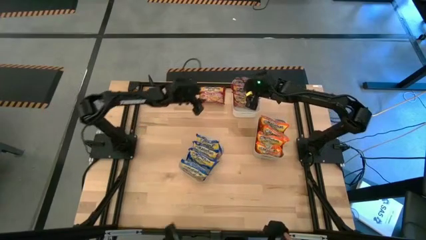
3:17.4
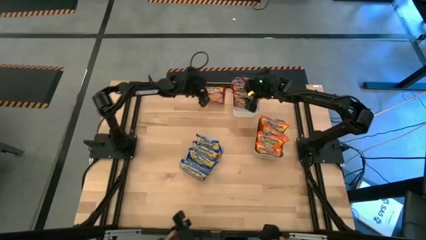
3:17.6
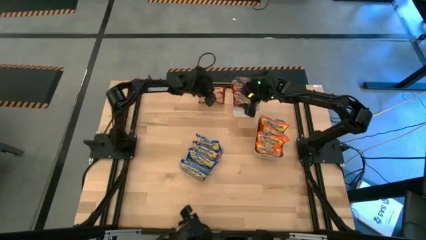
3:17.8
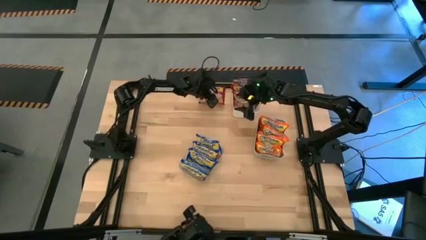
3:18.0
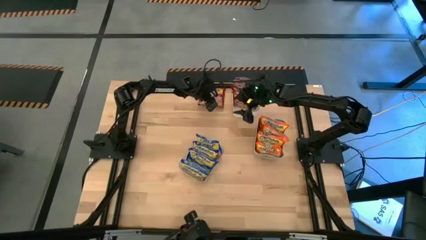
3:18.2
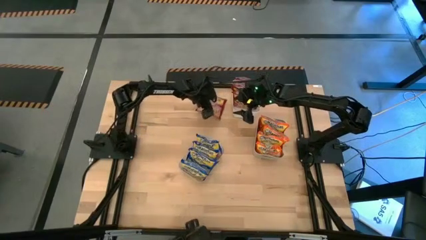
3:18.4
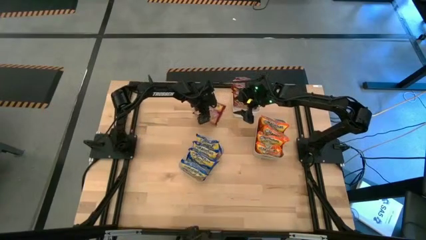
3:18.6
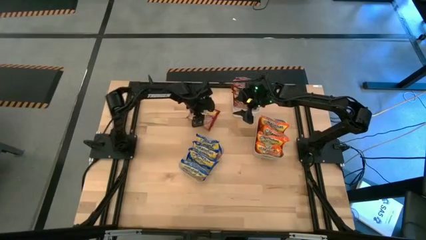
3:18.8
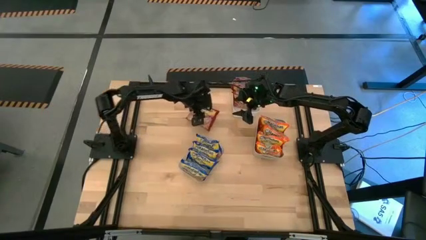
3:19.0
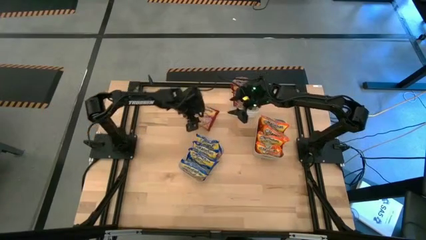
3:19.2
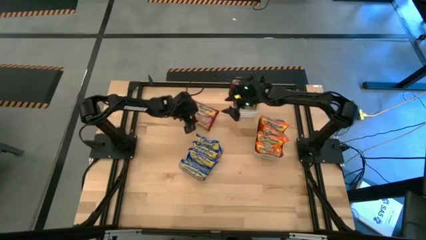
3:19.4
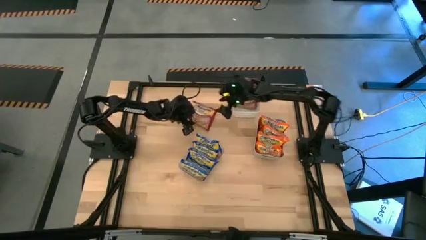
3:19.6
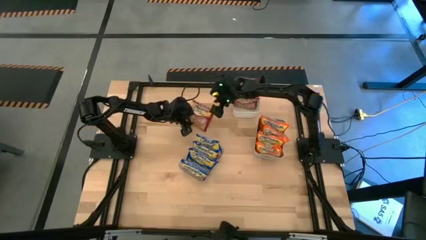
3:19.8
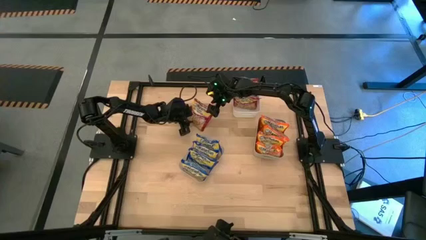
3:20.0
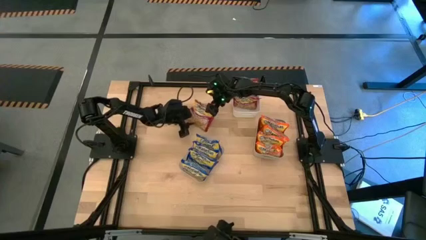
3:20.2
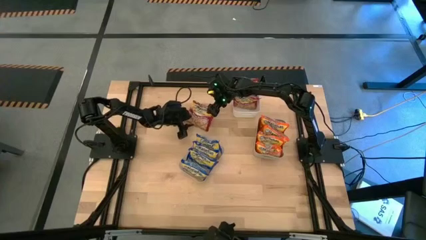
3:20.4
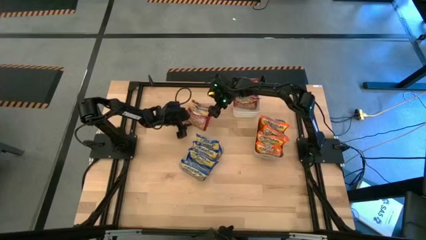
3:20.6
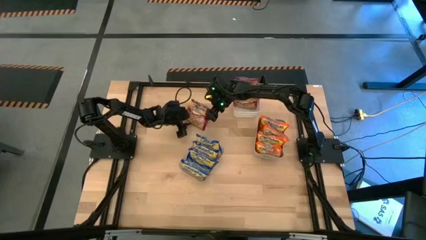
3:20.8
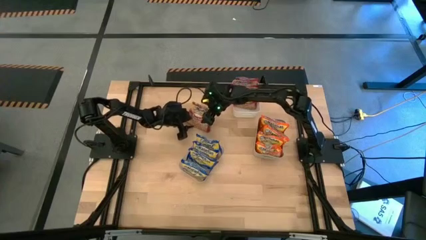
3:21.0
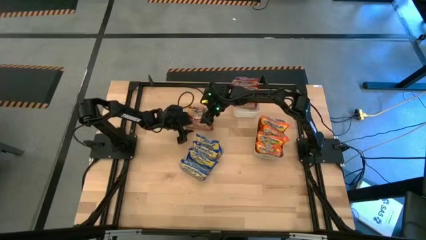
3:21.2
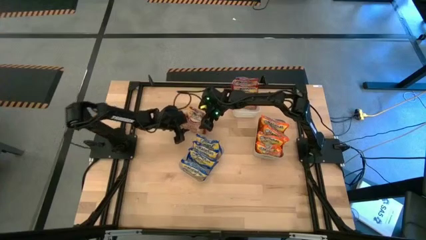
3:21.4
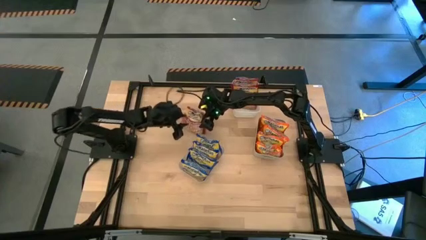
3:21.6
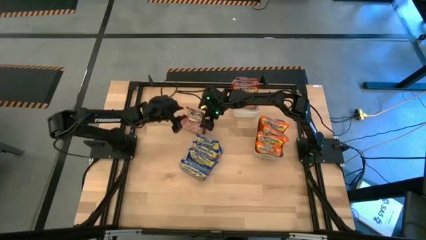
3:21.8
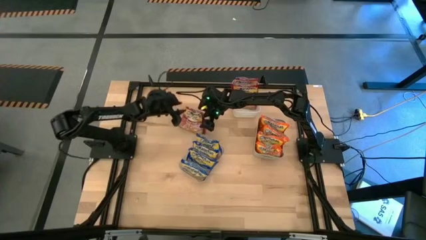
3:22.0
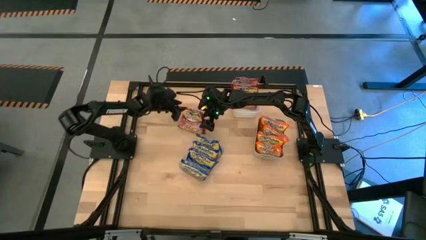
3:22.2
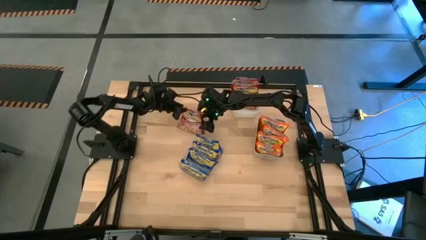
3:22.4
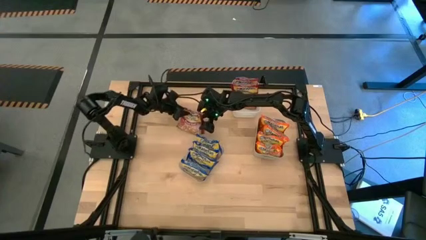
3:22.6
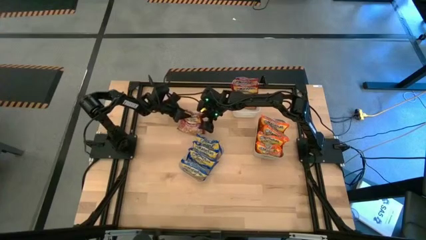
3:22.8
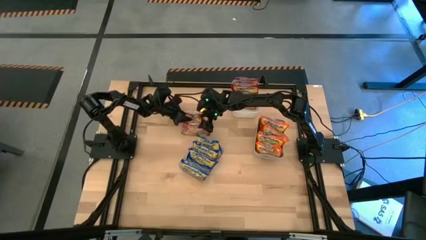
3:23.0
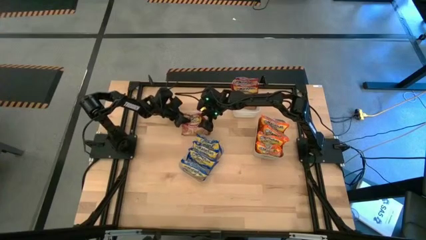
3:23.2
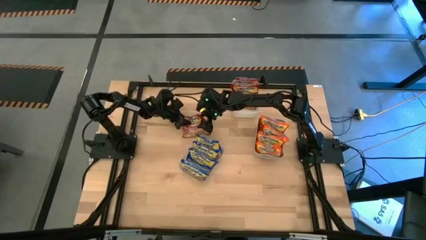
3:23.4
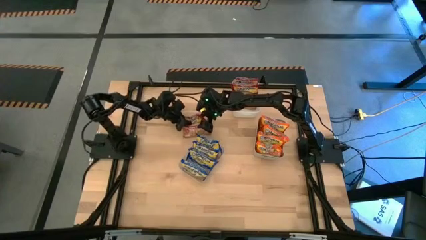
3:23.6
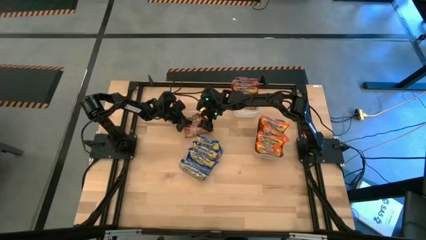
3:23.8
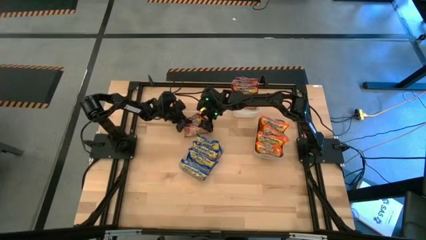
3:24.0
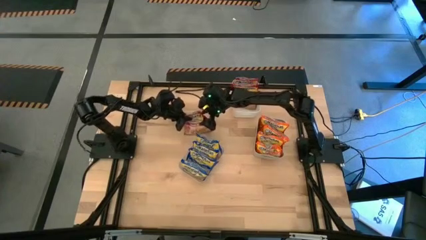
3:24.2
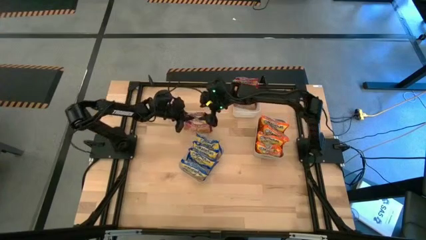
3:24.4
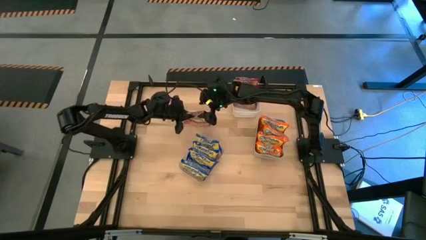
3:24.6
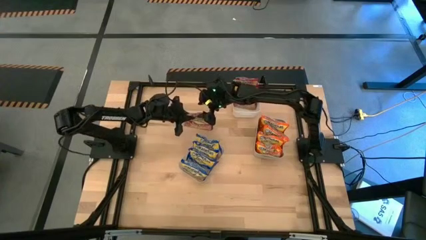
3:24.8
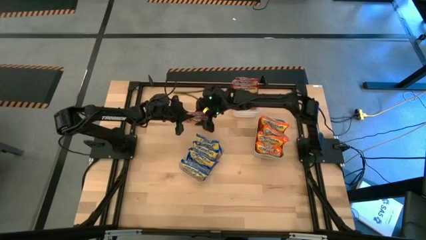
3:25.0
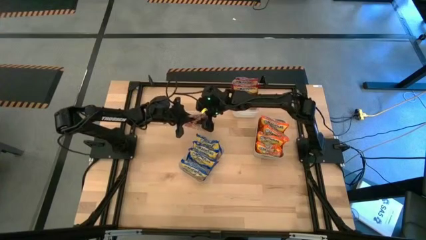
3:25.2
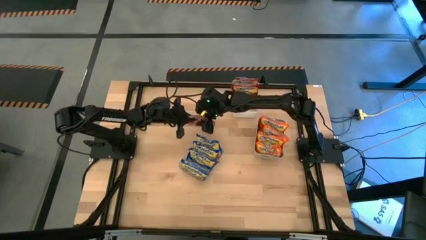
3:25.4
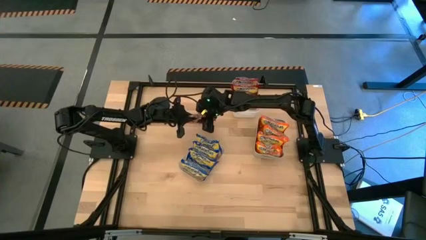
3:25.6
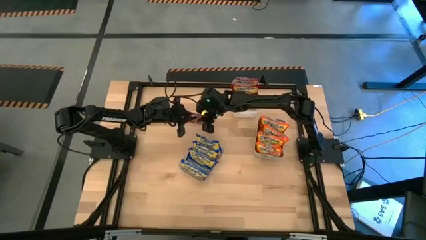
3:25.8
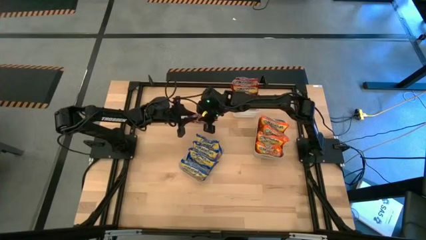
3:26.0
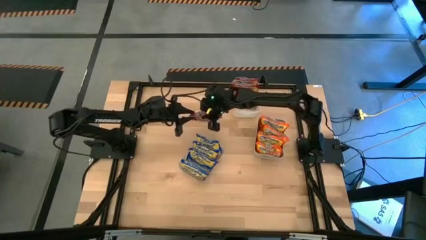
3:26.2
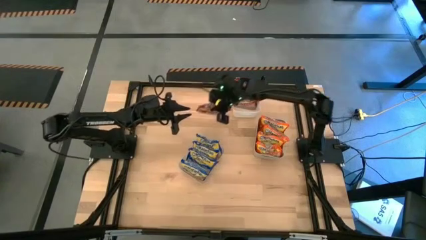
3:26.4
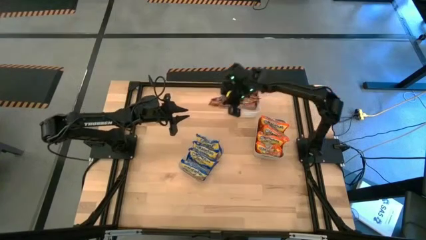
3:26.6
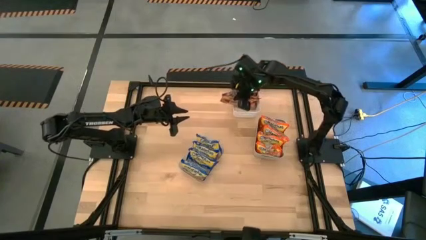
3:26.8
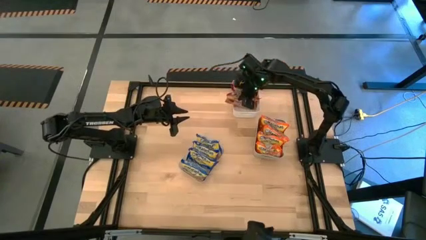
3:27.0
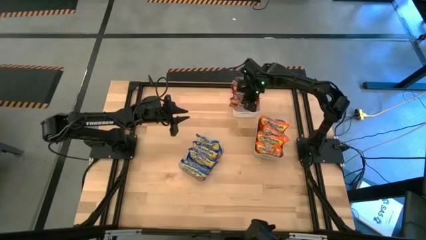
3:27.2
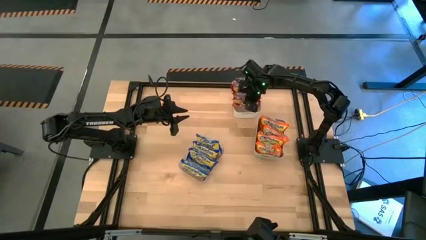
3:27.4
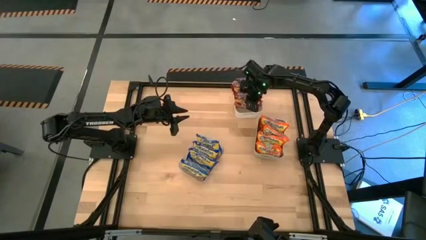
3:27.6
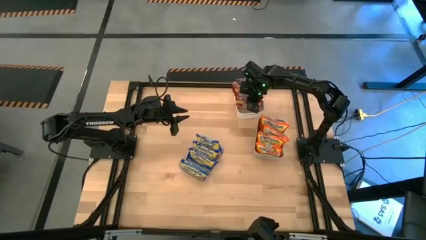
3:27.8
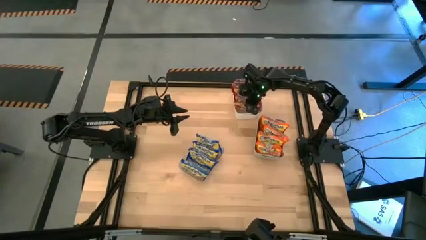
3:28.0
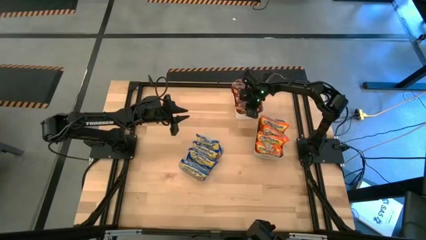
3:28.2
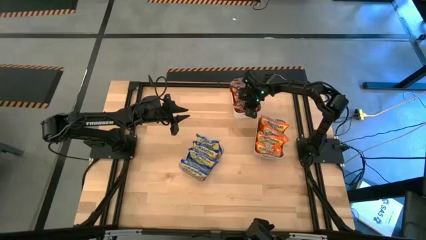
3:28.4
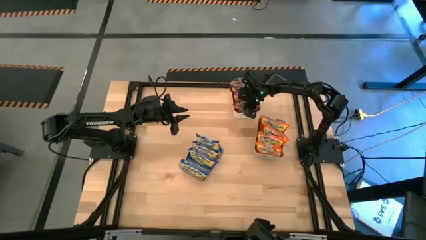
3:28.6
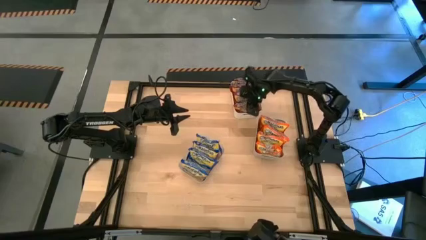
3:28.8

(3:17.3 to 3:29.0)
Task: Sort Maruchan noodles
Put the red noodle pack into the white bin

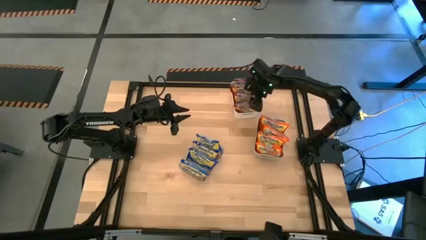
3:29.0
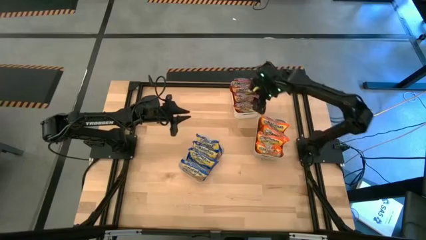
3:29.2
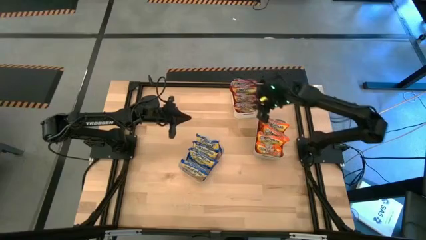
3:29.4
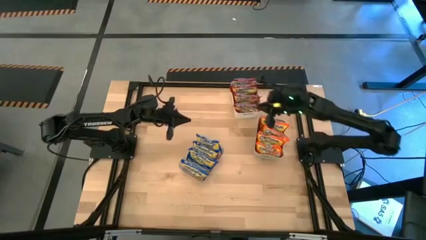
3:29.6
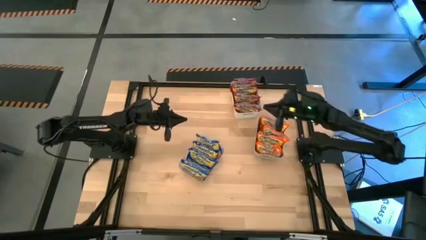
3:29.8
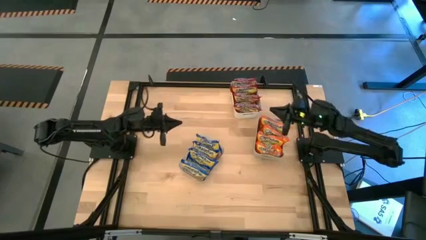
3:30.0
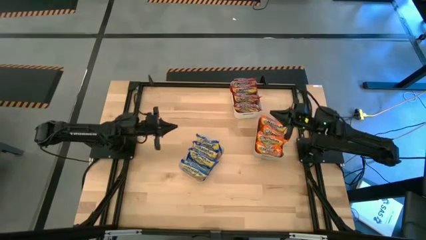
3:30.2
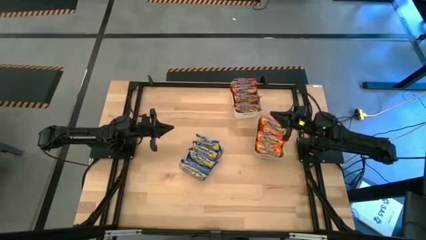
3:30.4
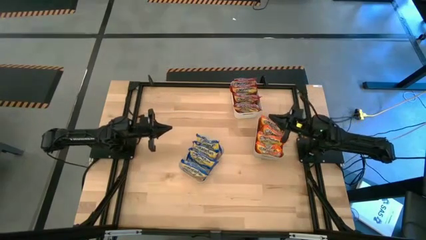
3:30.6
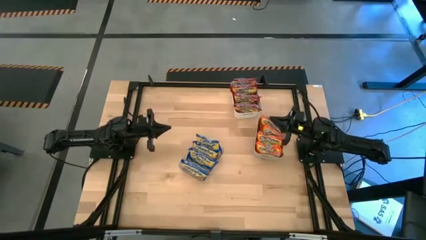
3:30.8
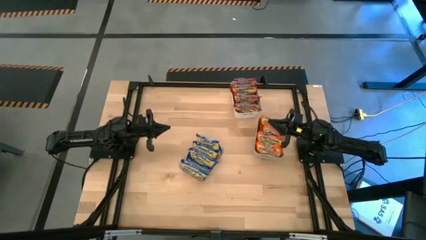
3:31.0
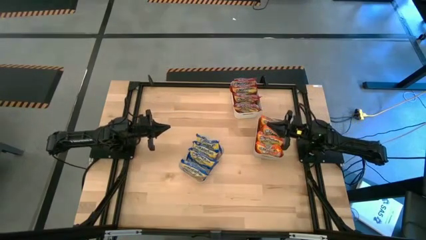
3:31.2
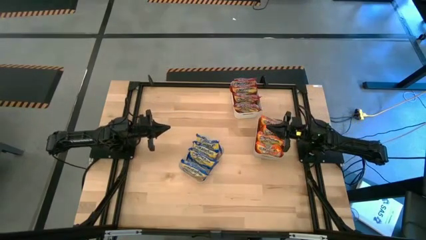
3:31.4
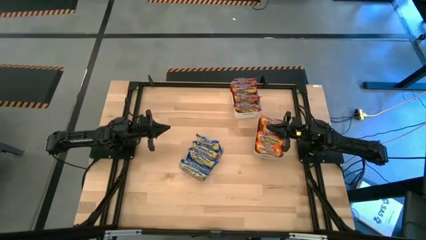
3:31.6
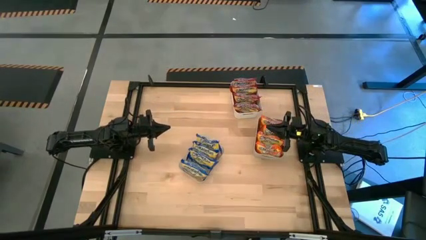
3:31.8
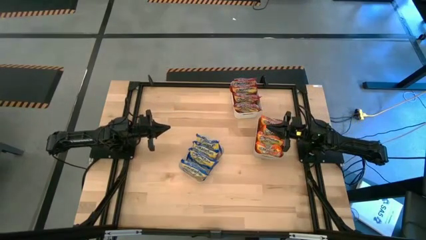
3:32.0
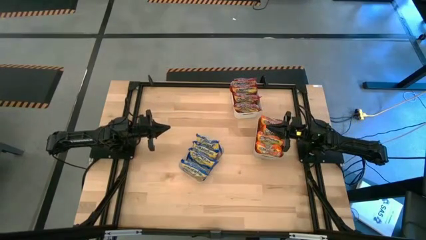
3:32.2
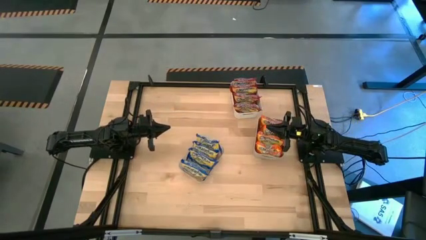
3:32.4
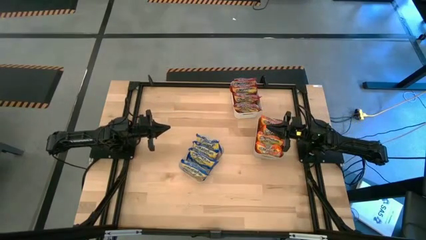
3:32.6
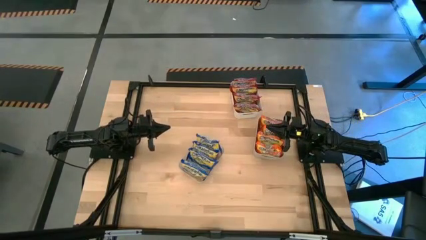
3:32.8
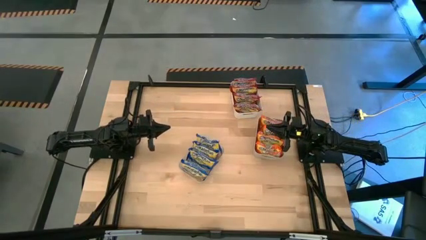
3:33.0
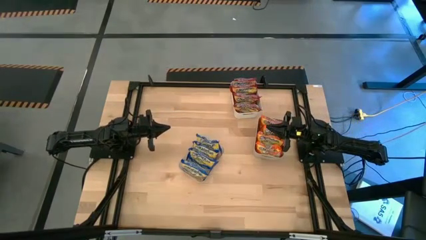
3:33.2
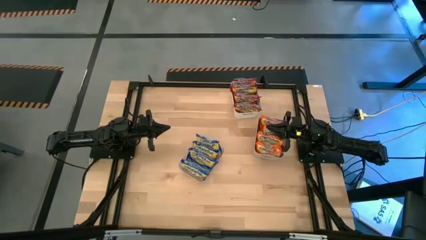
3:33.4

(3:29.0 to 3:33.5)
Return to Home Position
